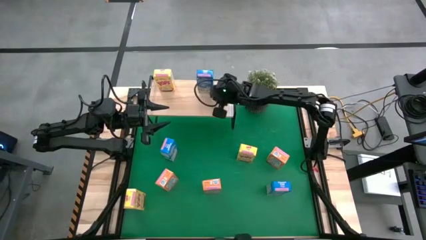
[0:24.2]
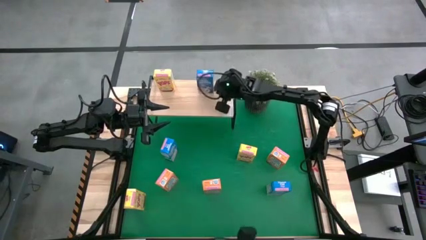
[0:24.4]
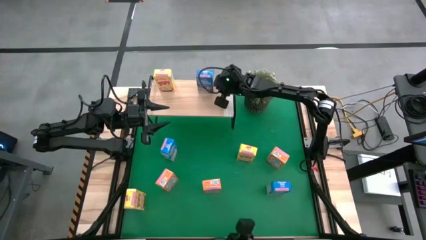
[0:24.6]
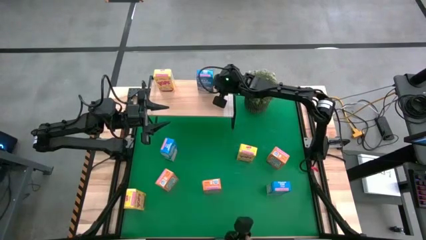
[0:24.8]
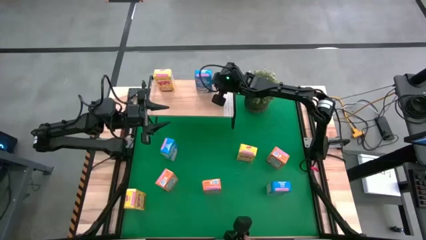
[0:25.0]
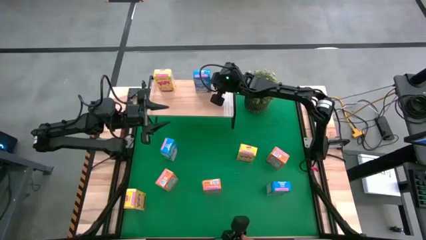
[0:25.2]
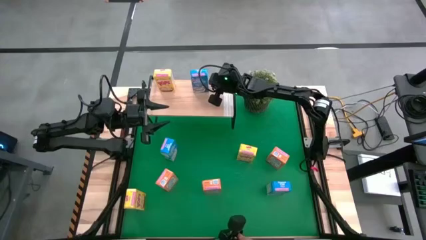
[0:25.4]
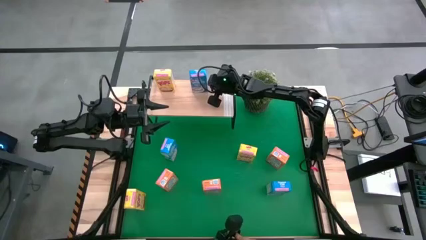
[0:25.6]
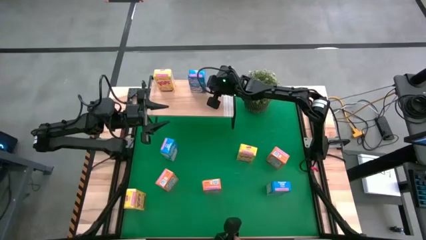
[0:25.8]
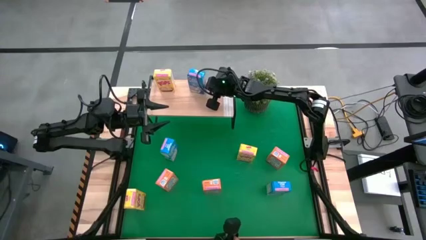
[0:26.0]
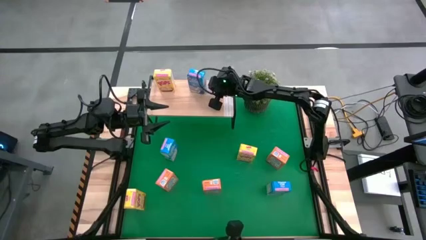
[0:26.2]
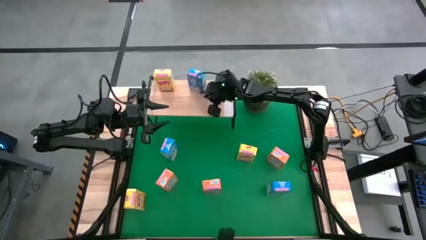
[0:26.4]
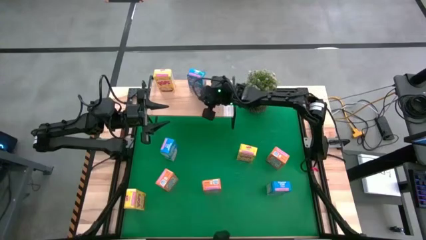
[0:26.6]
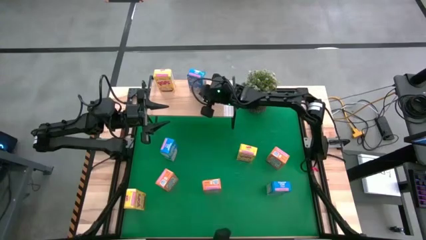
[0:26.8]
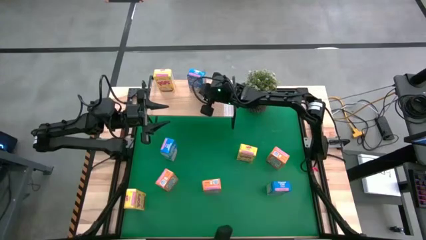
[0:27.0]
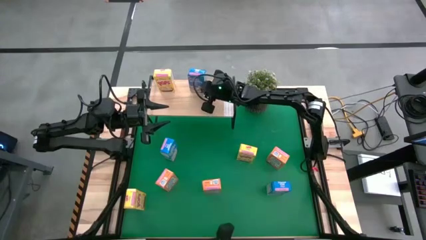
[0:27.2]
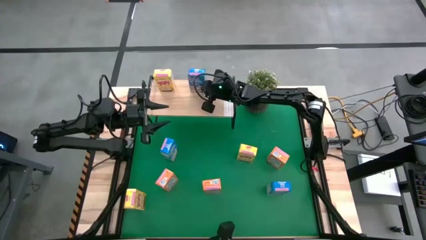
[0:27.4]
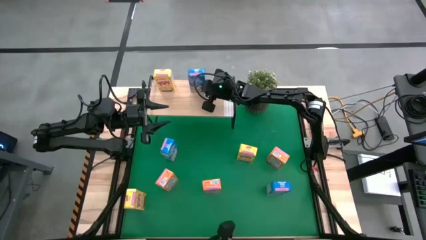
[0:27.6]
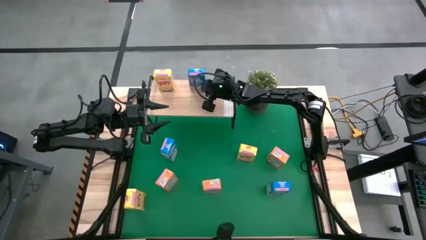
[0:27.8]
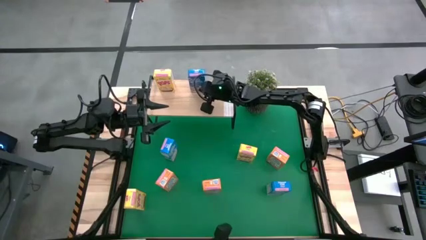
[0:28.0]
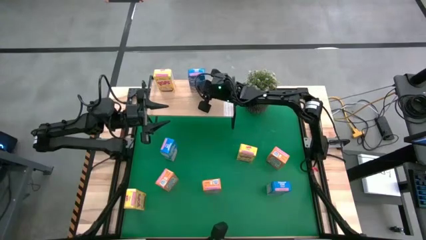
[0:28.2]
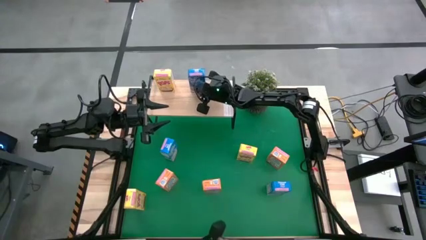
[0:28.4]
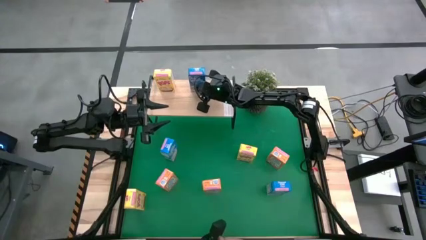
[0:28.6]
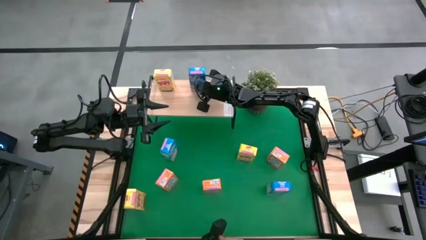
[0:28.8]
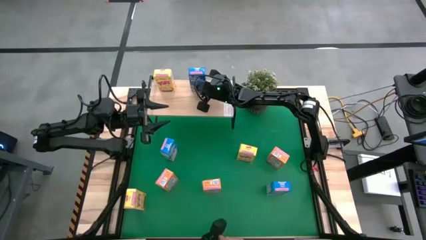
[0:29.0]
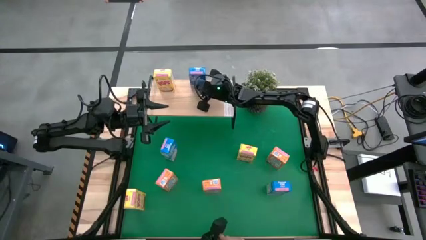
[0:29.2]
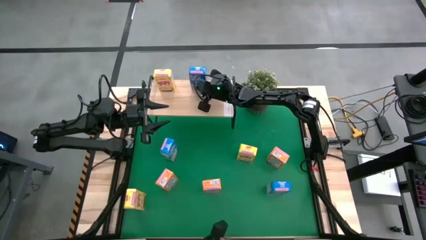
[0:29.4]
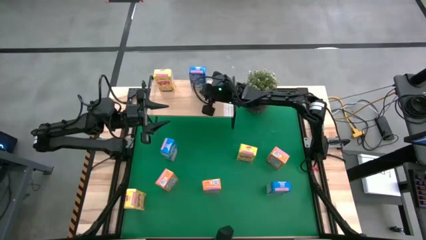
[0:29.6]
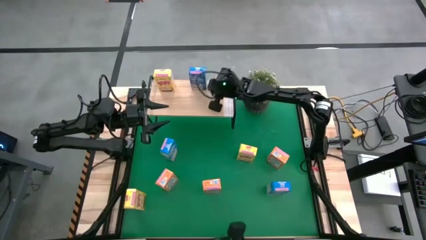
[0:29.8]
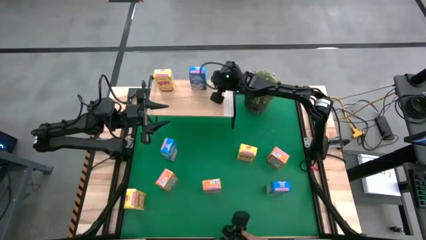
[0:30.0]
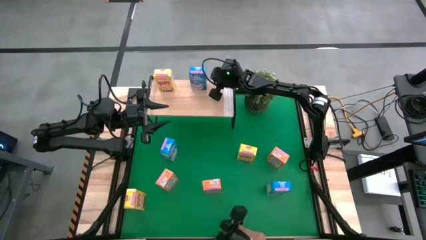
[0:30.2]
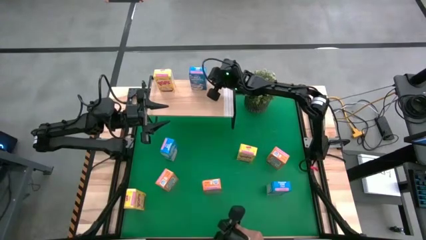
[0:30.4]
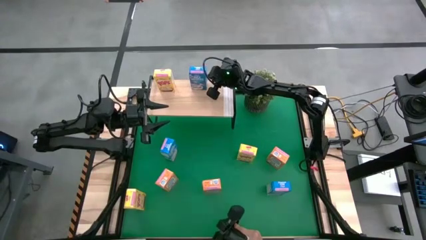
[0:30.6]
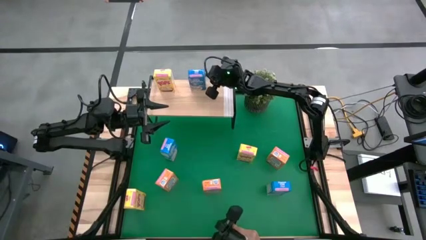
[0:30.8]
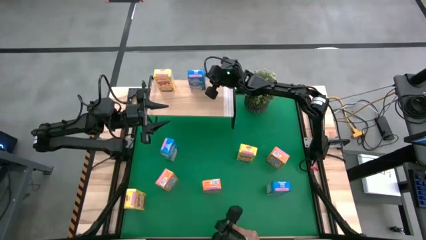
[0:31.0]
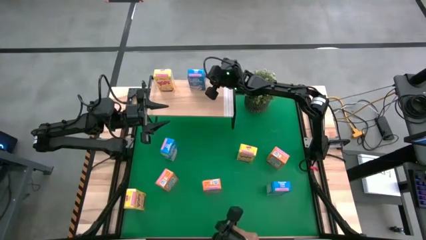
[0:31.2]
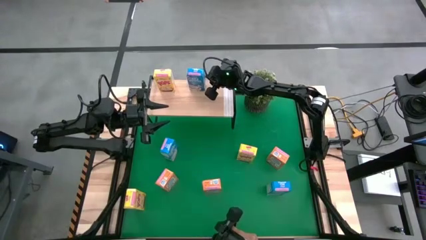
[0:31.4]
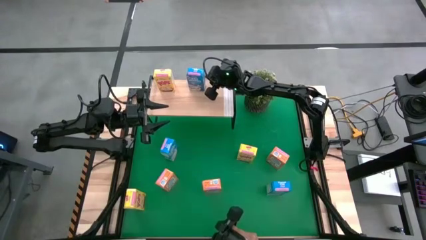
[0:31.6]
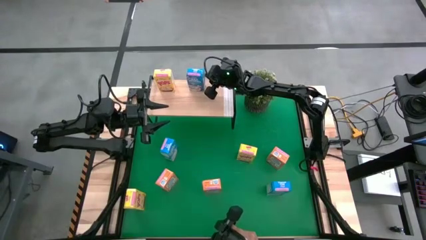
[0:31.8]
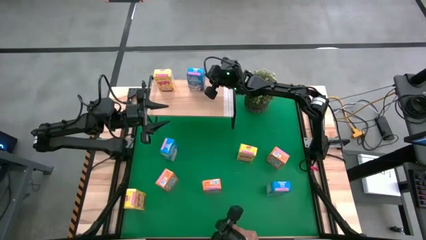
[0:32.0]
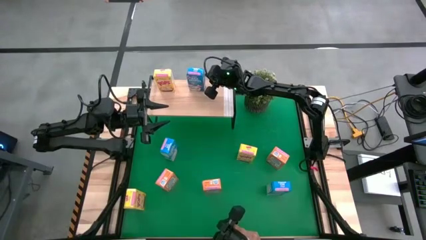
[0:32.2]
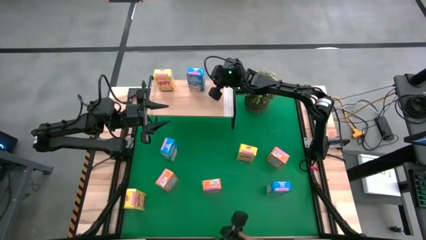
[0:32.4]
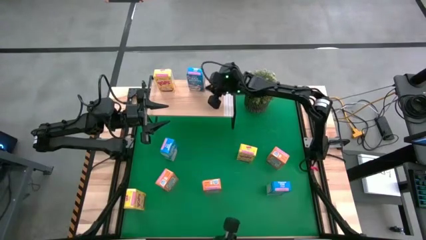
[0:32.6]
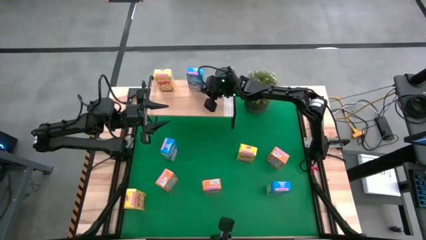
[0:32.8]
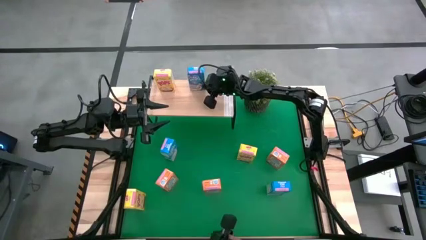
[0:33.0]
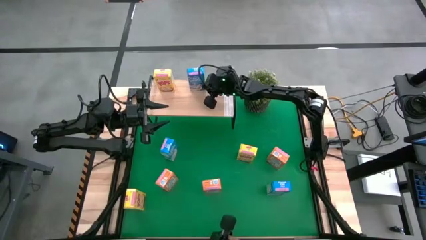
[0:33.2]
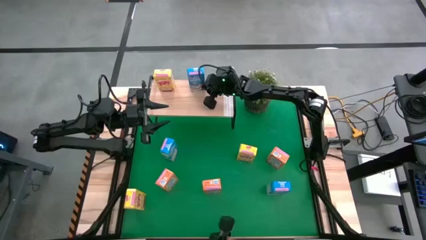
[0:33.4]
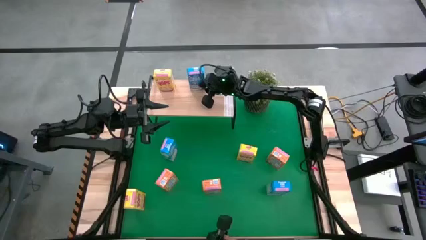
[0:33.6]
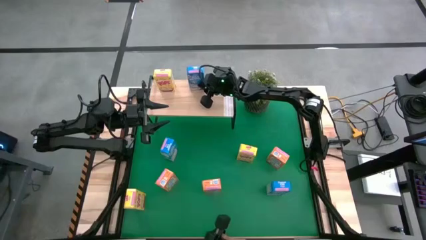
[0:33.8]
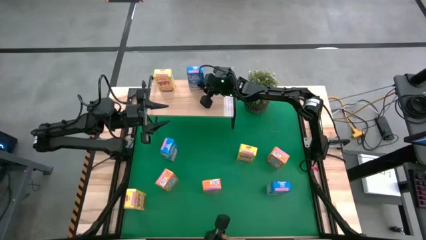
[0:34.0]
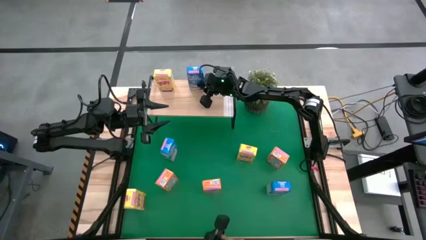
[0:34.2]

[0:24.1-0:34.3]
Task: Stack cereal on shelf
Put the top right blue cereal box on the shelf

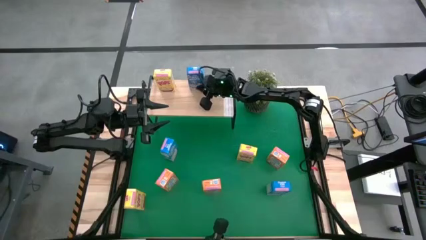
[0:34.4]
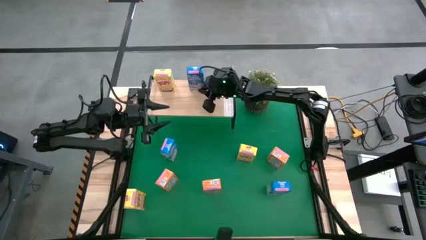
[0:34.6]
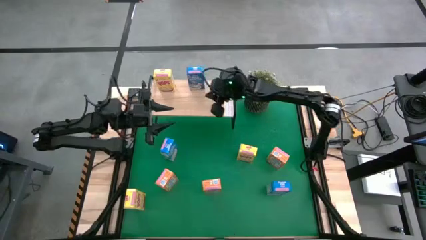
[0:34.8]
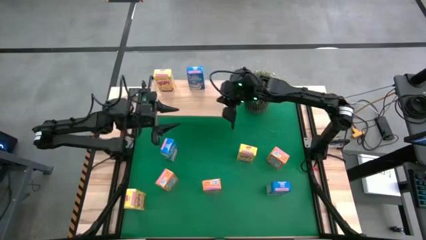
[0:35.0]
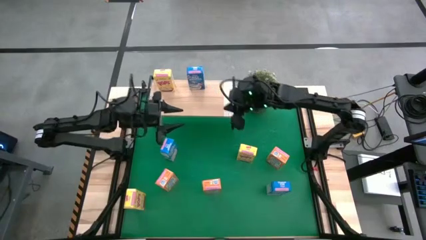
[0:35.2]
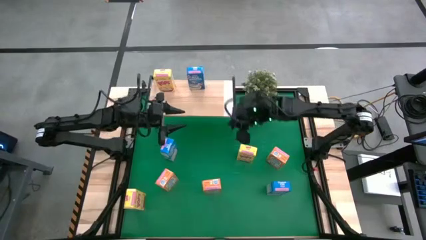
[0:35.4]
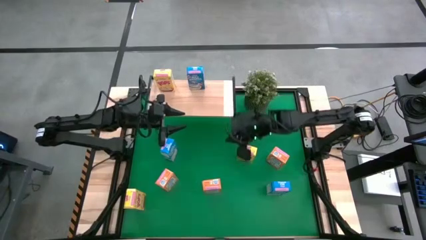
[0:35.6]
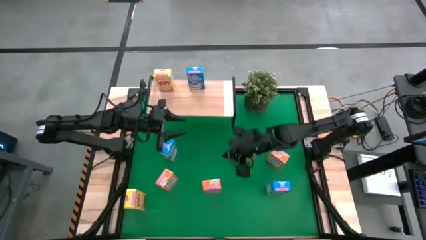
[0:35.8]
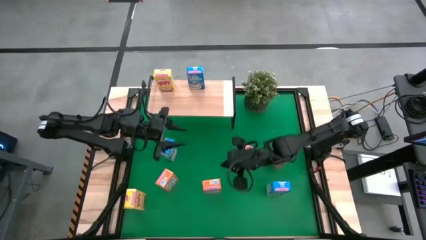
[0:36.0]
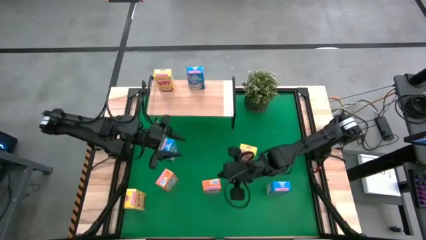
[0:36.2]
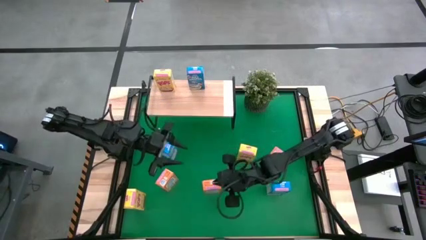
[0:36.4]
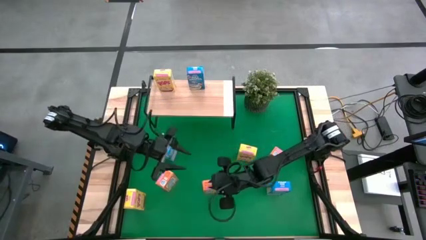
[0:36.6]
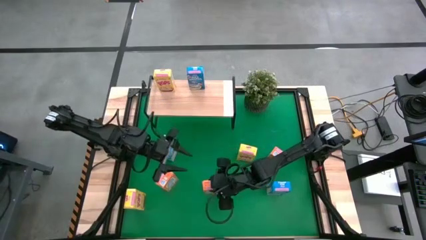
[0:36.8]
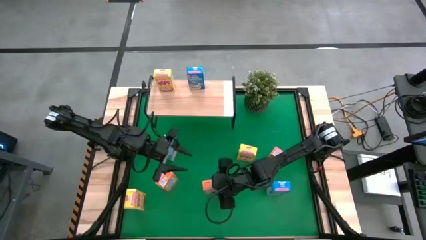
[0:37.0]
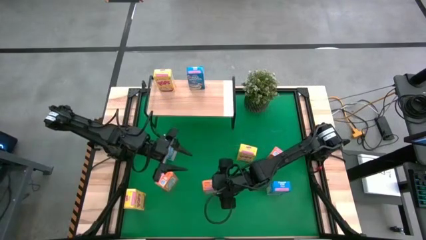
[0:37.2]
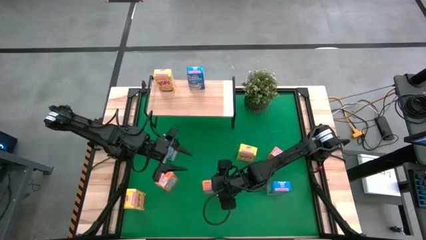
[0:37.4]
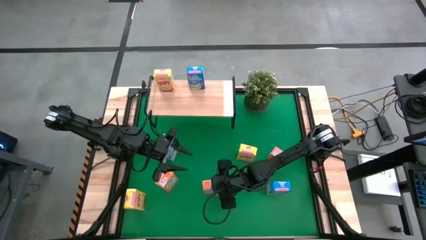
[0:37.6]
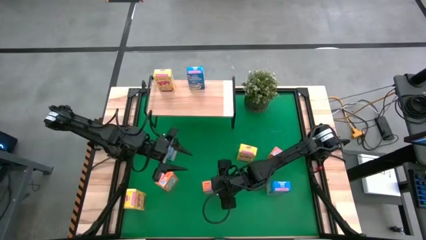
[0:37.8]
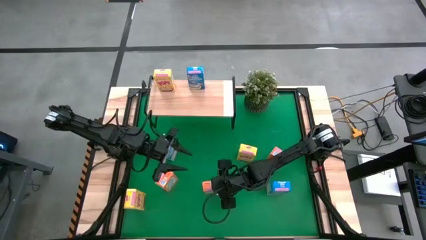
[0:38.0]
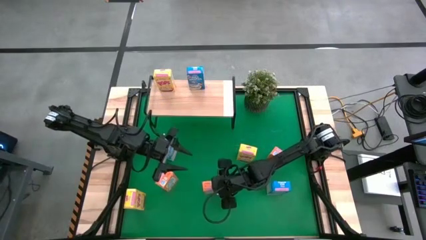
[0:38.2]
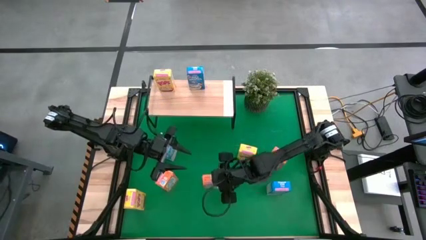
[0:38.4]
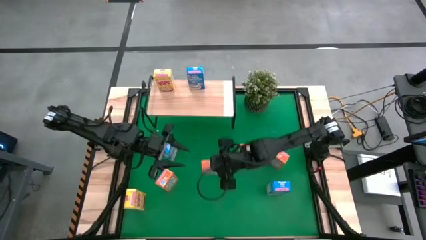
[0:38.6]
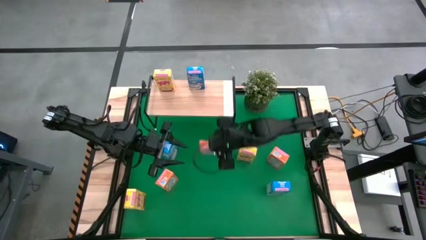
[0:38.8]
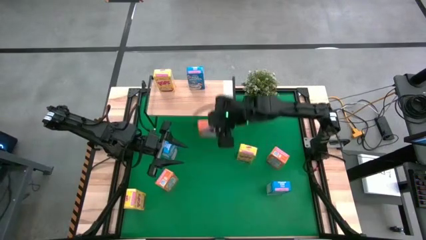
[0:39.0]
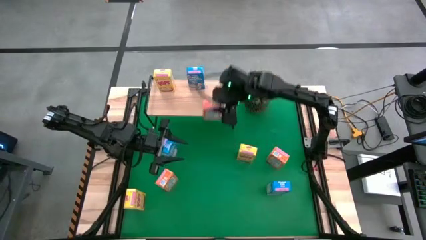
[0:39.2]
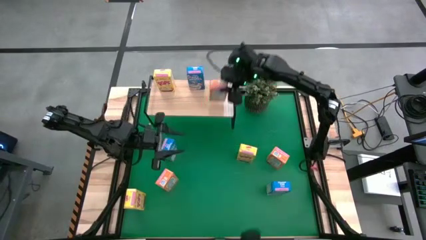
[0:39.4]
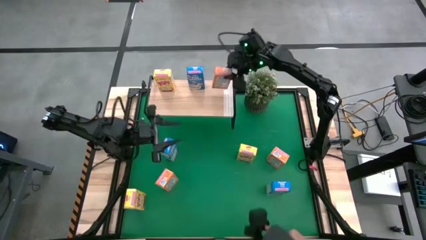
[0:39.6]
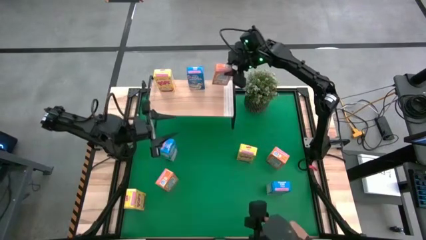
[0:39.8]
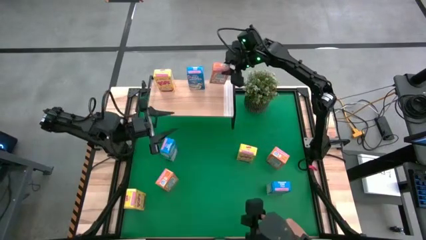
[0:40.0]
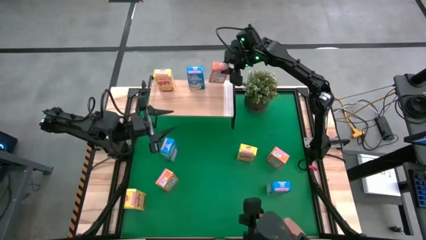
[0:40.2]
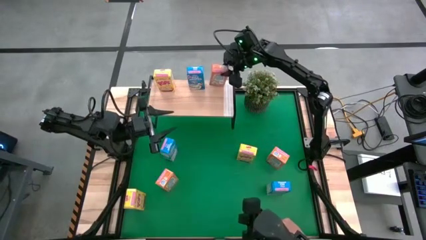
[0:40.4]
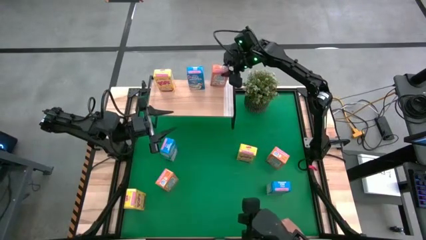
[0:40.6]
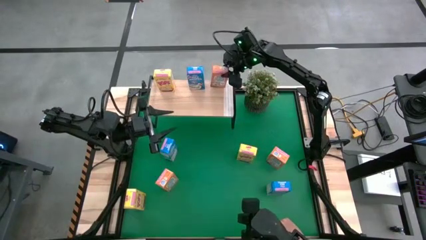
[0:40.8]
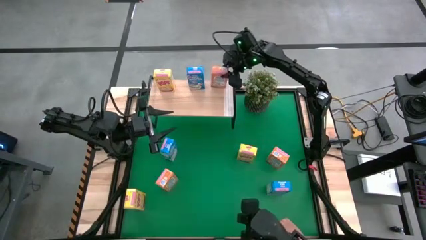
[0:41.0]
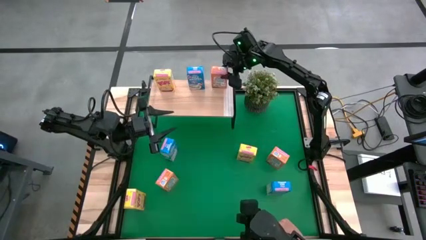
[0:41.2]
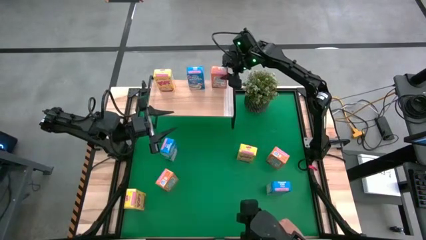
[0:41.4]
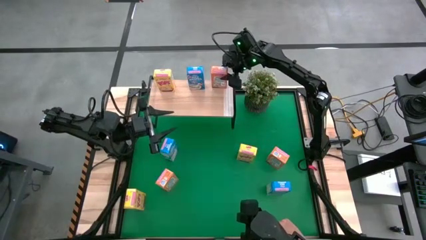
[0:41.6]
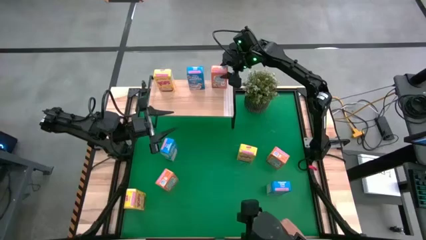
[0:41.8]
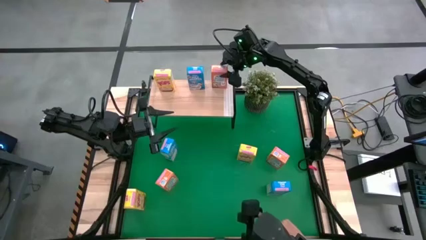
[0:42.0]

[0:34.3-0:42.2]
Put the middle orange cereal box on the shelf
